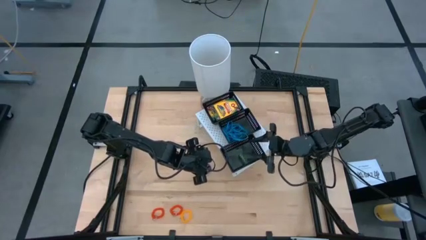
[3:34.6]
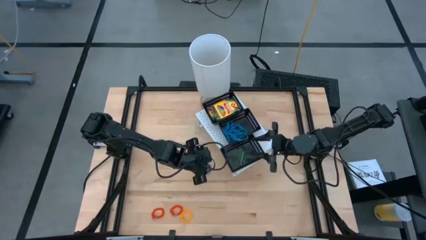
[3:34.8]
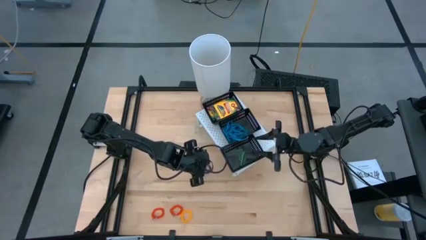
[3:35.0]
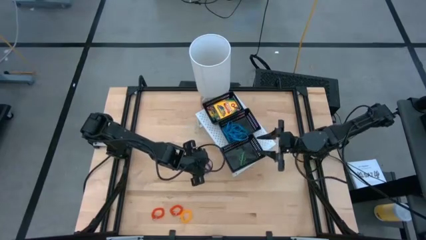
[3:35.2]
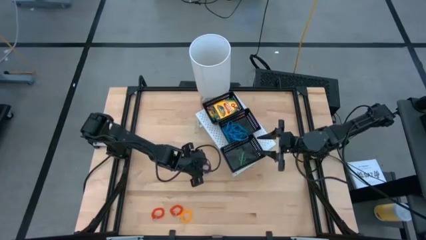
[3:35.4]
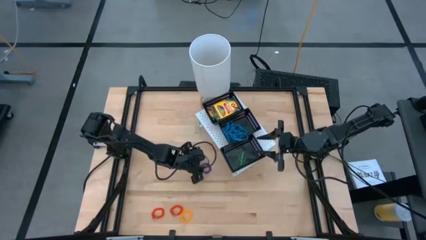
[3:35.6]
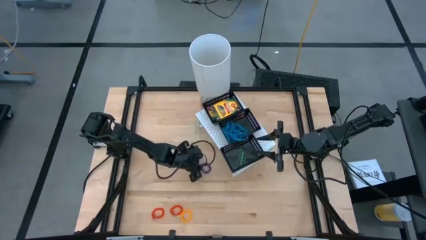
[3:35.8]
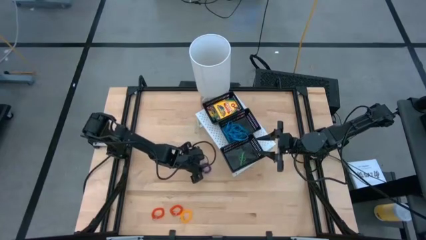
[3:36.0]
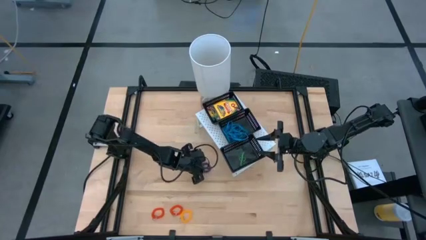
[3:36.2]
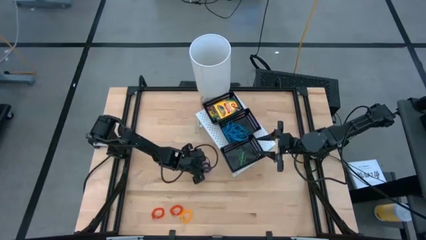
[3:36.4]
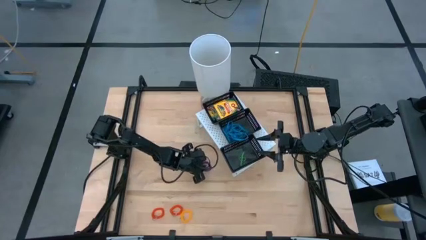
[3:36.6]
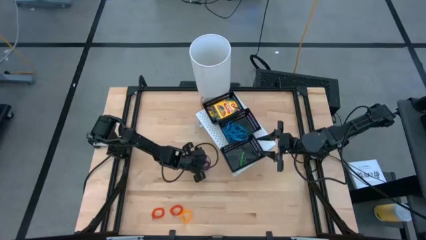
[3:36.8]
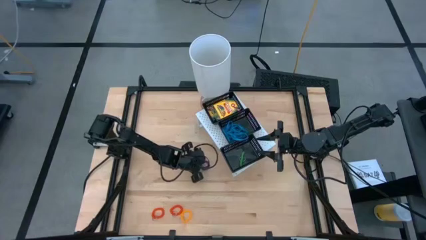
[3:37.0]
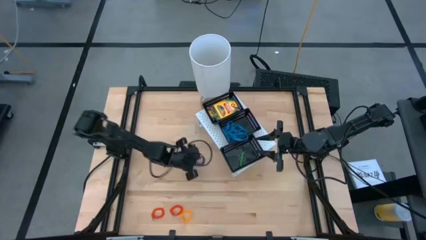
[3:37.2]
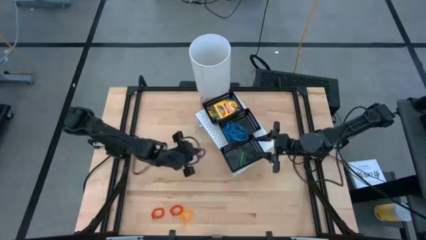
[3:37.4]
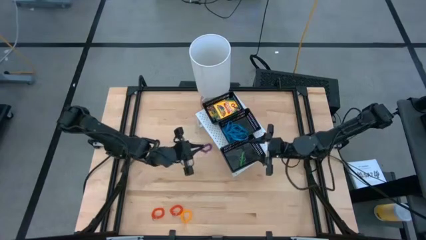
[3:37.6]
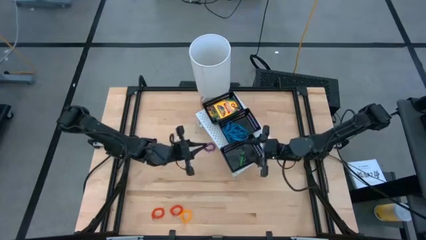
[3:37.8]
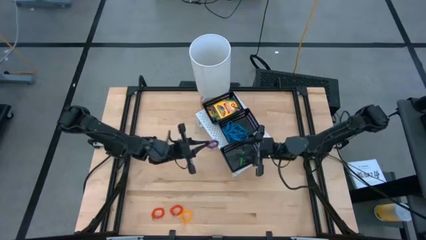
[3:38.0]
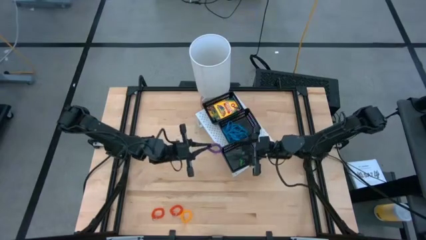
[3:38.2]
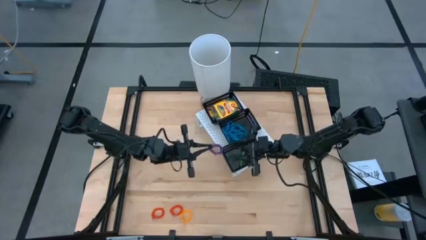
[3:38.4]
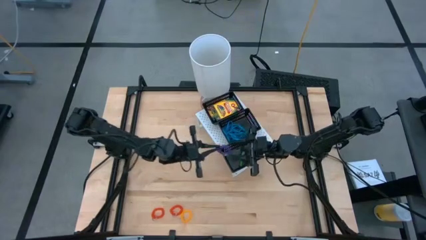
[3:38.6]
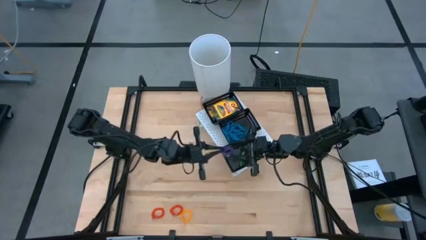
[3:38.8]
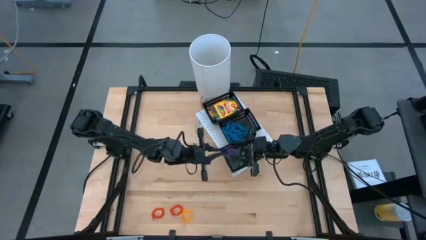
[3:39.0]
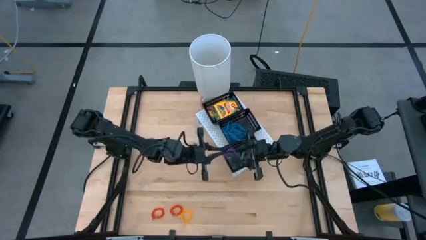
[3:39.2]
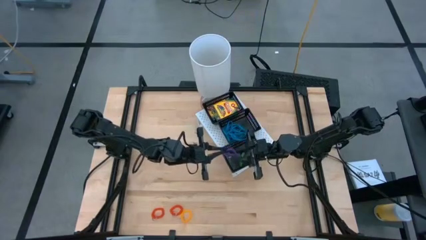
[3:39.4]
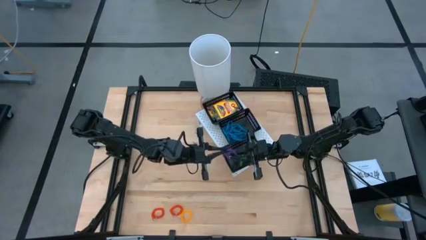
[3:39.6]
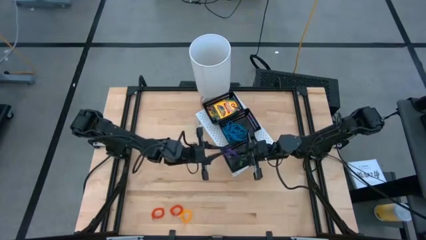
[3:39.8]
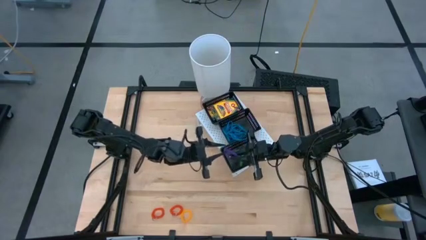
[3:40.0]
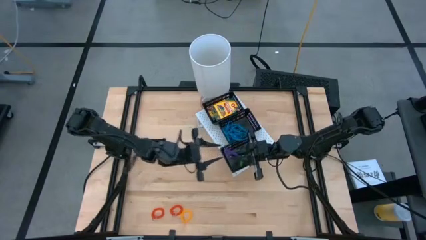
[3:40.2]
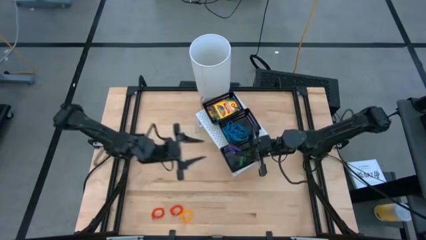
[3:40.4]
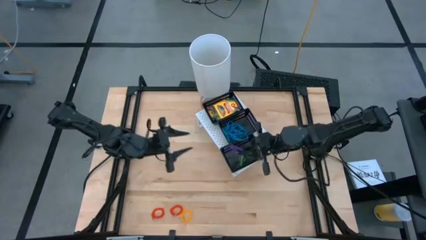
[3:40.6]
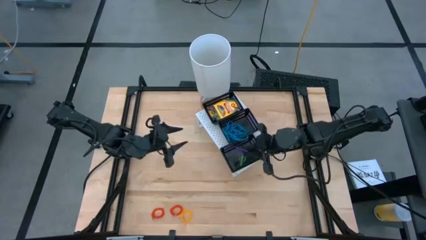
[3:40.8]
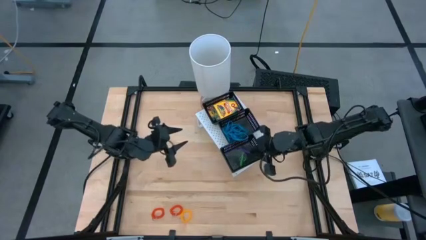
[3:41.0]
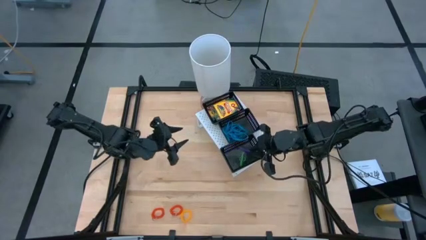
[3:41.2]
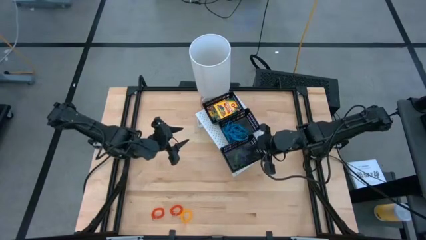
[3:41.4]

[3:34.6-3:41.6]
Task: Pick & Place Office Desk Supplies
Put the purple spring rubberband into the bottom black bin on the shelf

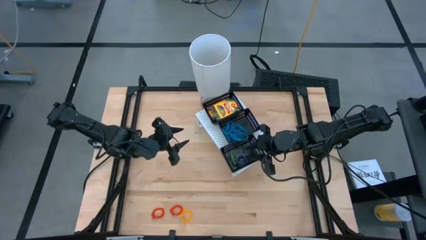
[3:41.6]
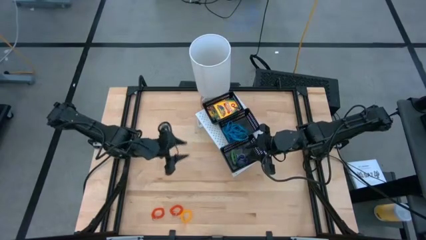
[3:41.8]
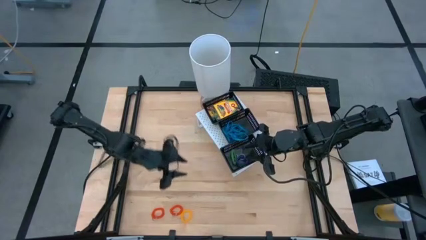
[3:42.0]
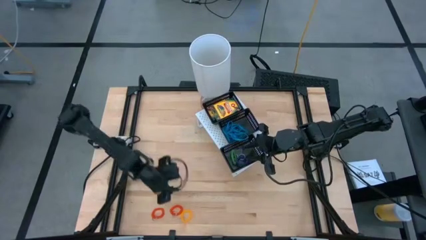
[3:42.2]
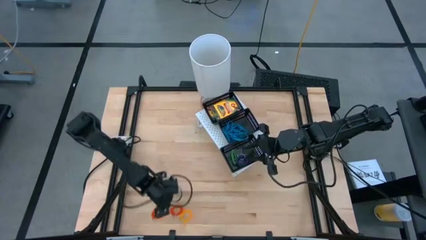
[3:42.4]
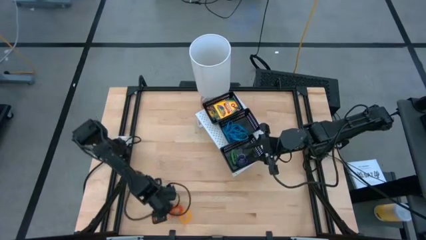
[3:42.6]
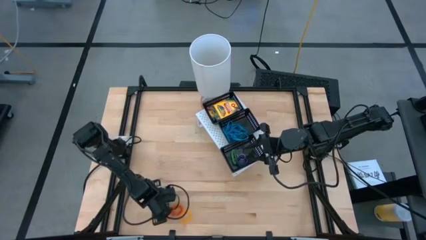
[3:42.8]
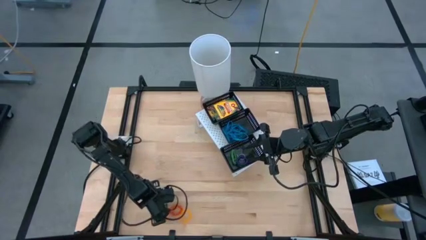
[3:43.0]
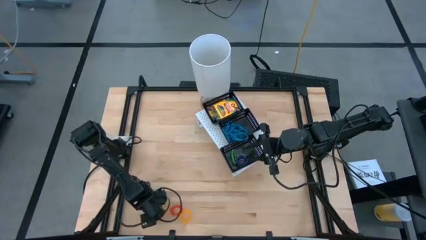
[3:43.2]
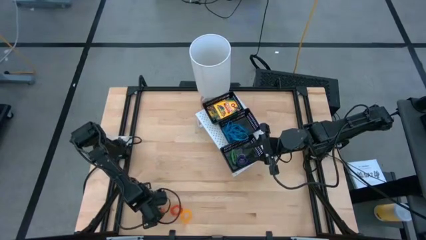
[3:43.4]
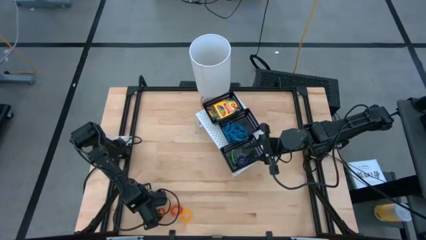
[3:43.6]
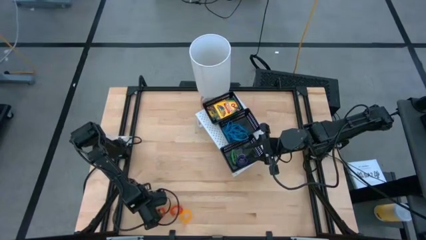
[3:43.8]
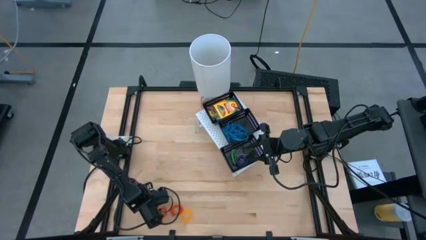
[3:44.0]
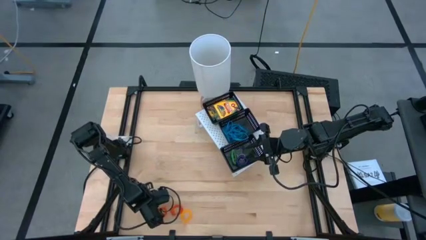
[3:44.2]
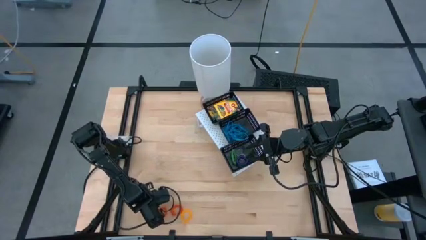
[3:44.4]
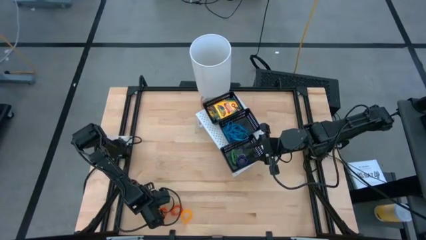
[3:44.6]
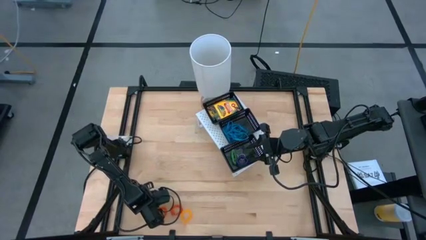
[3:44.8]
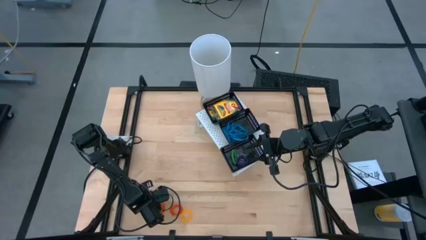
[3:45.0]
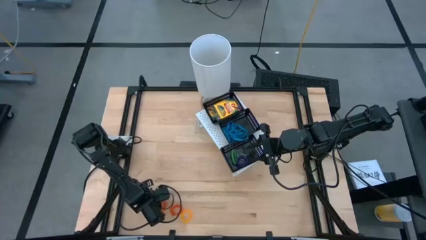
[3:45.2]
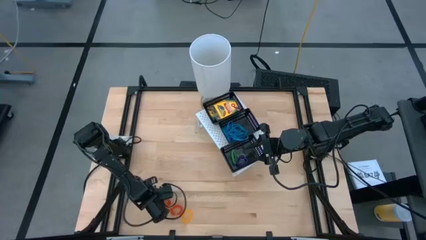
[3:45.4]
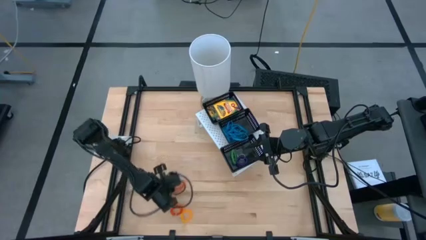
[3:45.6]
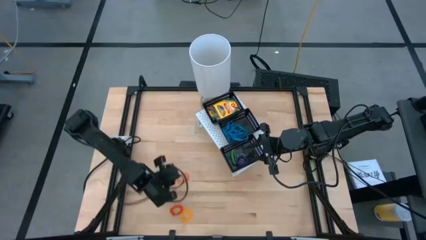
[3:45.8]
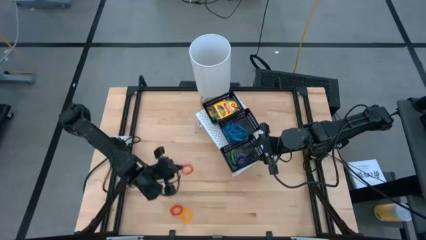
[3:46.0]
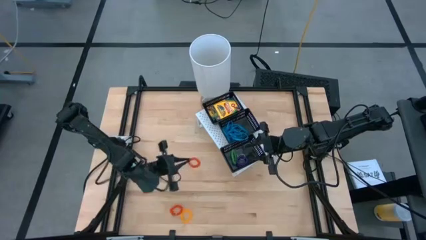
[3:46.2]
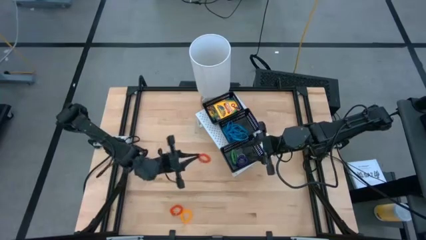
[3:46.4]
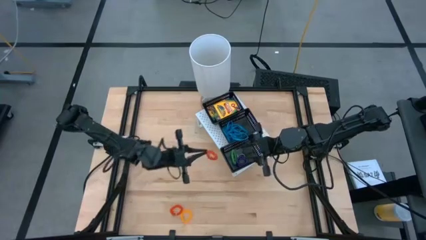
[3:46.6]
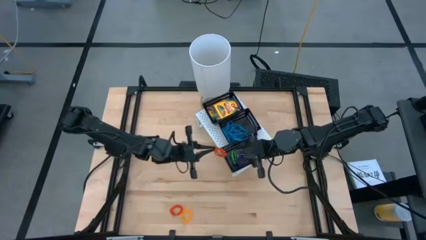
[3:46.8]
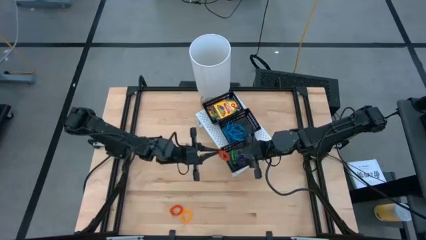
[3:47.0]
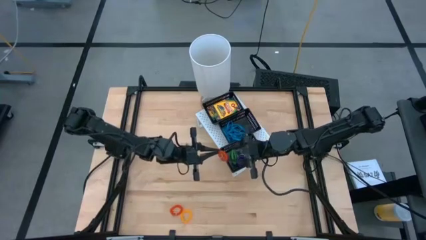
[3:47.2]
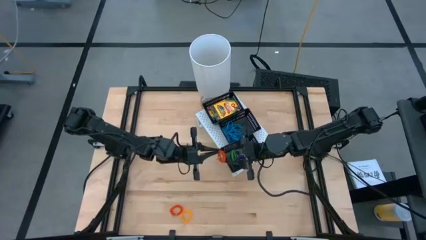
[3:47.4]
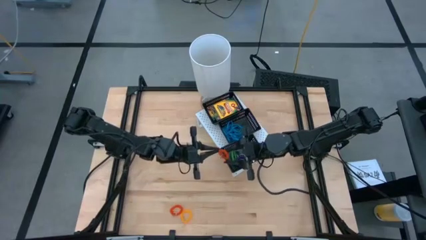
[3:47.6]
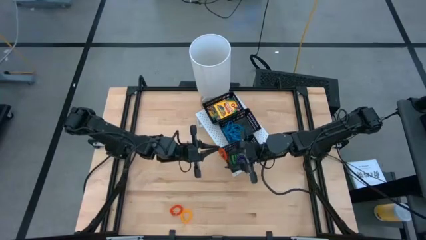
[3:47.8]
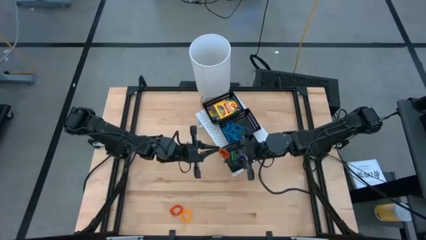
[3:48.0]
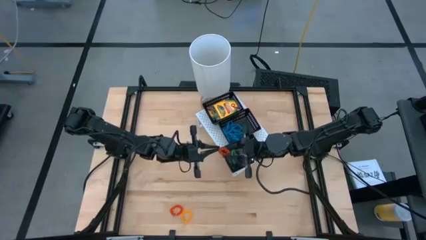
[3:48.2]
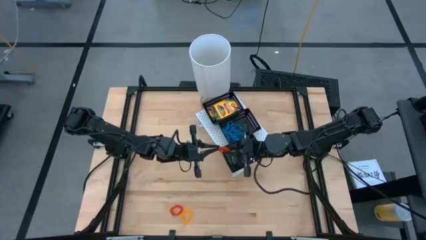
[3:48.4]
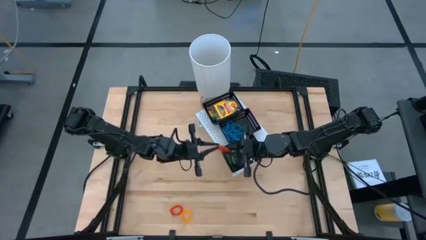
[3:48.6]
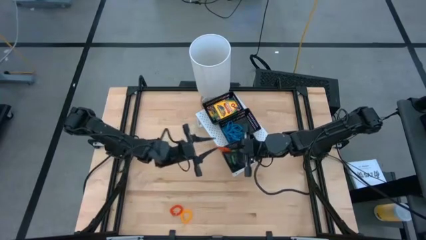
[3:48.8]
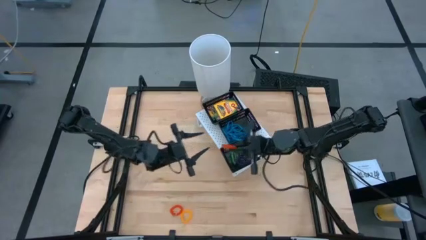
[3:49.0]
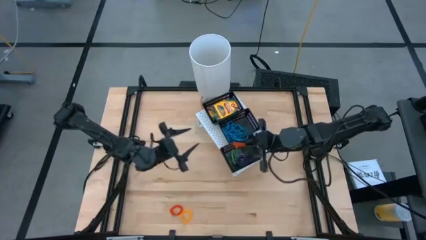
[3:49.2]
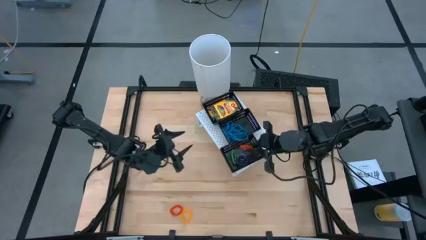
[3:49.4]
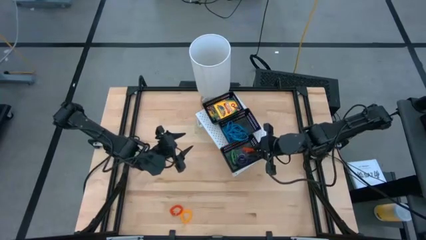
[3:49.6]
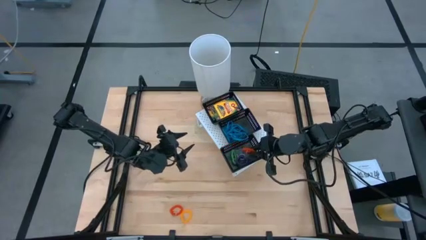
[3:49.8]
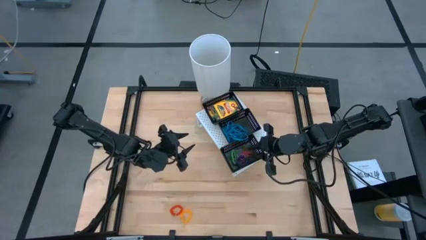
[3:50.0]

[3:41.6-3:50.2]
Put the orange spring rubberband into the bottom black bin on the shelf
